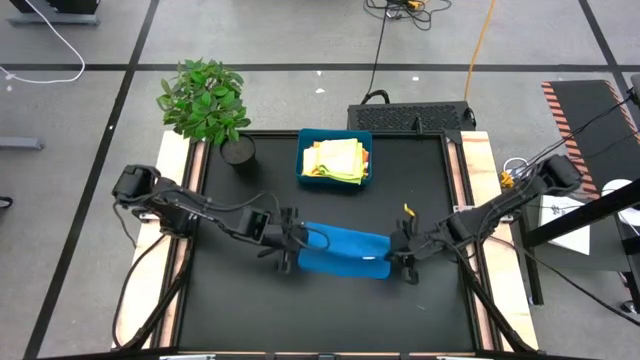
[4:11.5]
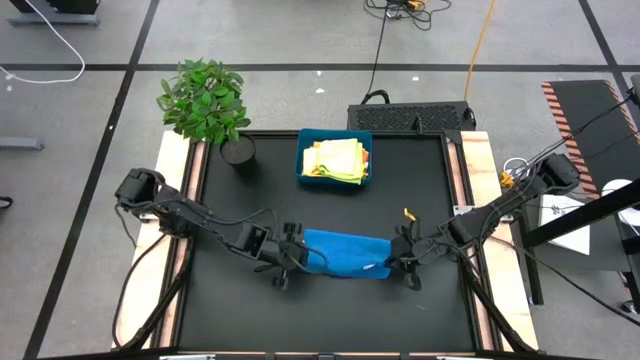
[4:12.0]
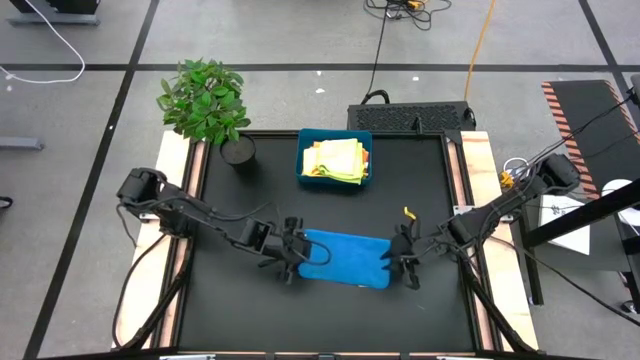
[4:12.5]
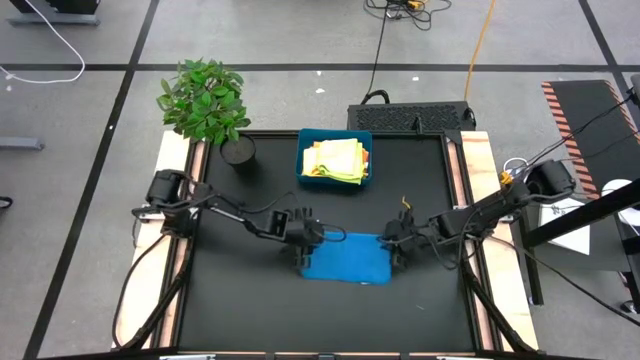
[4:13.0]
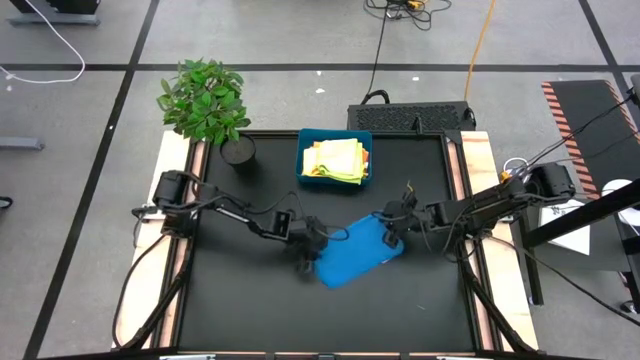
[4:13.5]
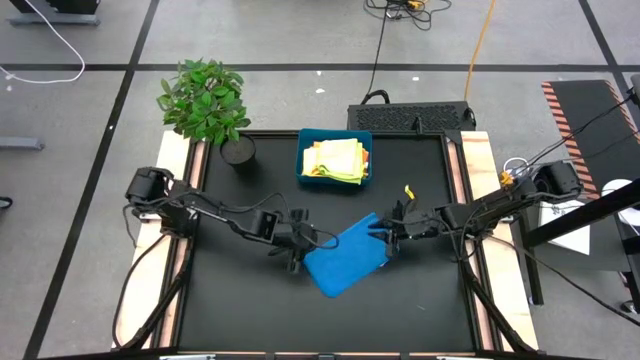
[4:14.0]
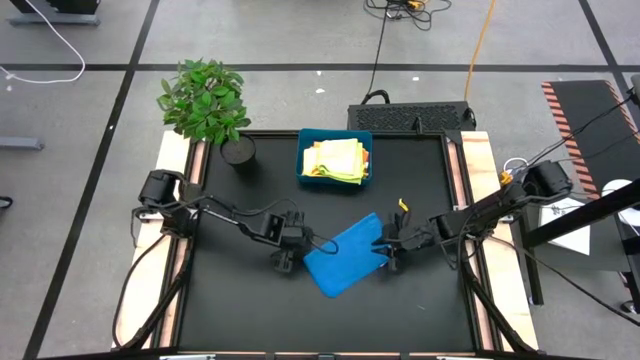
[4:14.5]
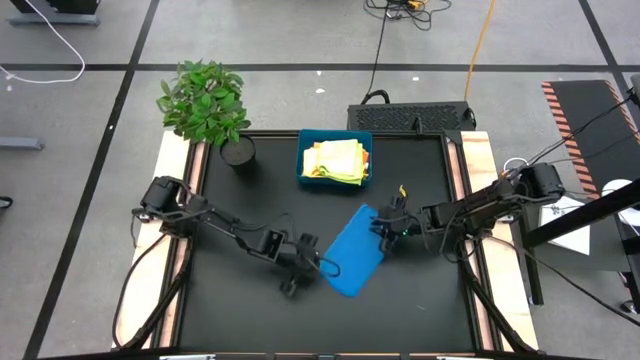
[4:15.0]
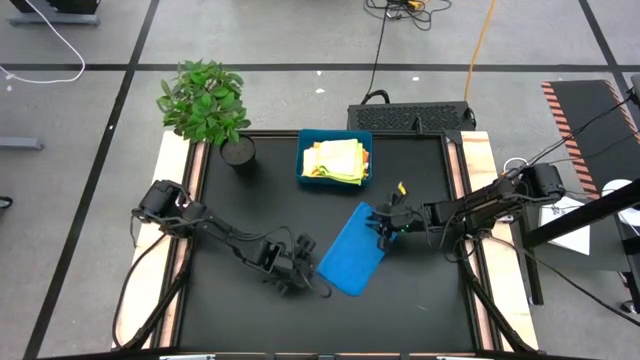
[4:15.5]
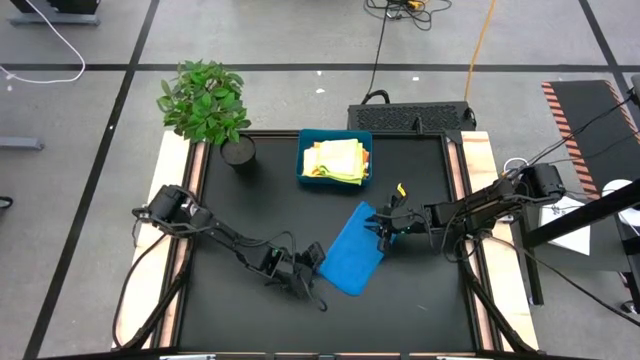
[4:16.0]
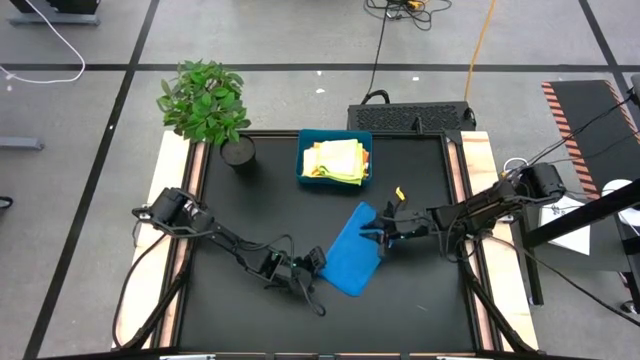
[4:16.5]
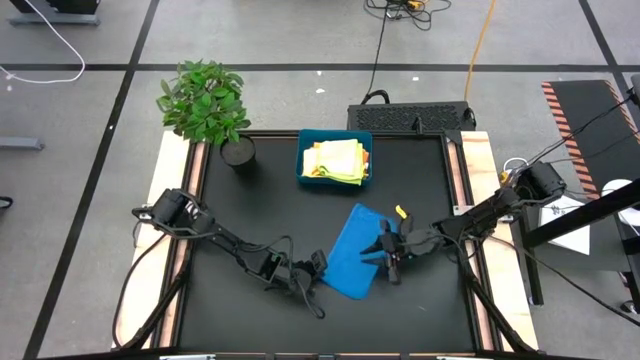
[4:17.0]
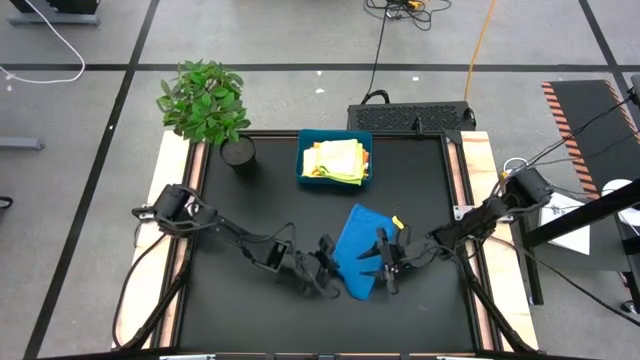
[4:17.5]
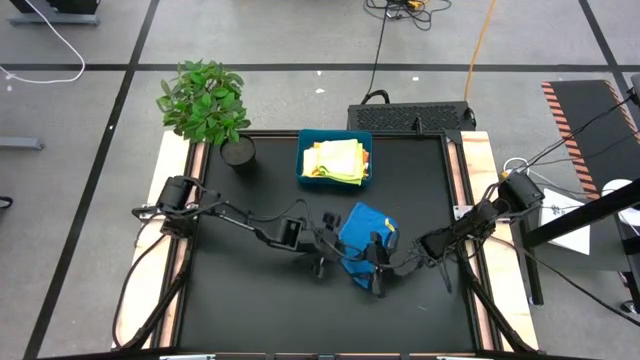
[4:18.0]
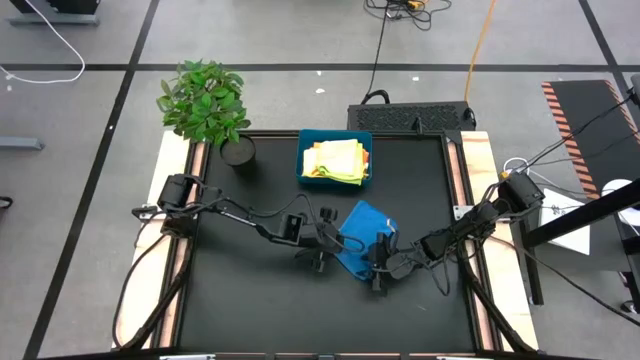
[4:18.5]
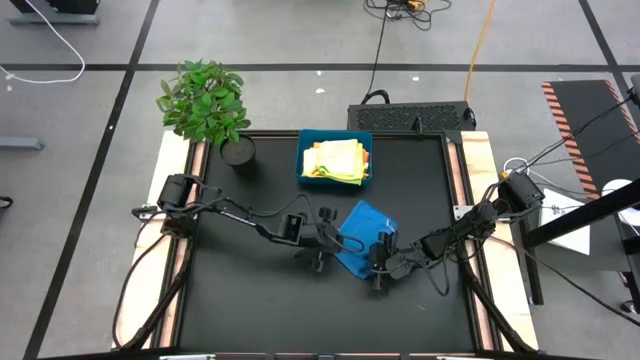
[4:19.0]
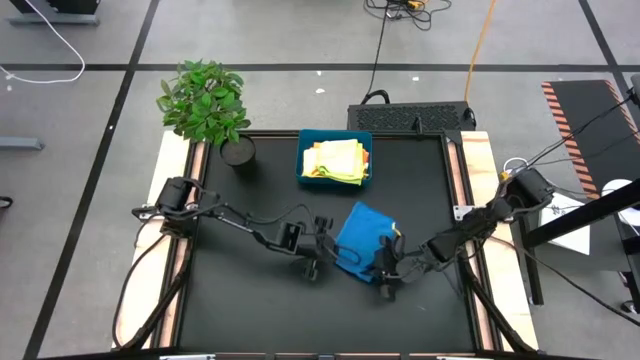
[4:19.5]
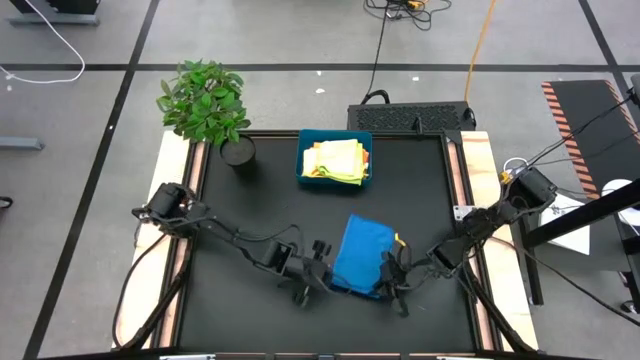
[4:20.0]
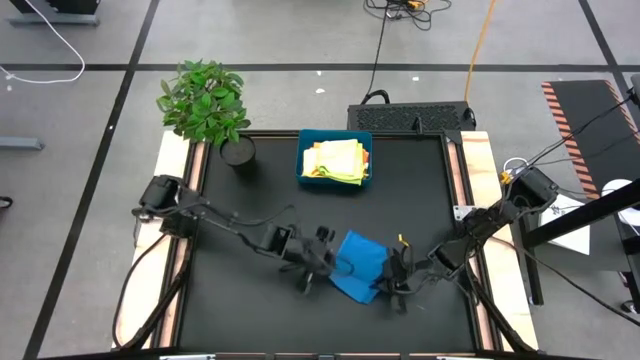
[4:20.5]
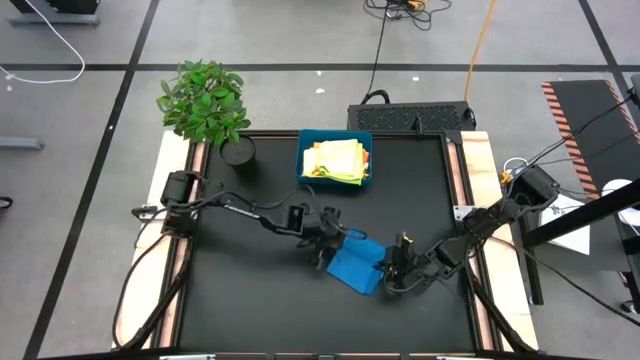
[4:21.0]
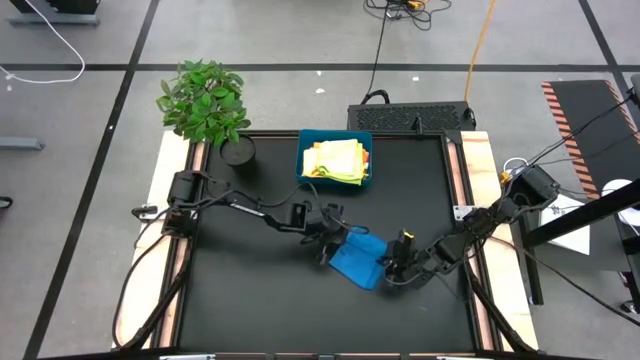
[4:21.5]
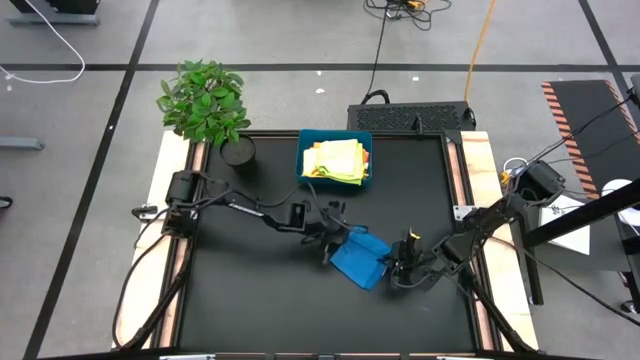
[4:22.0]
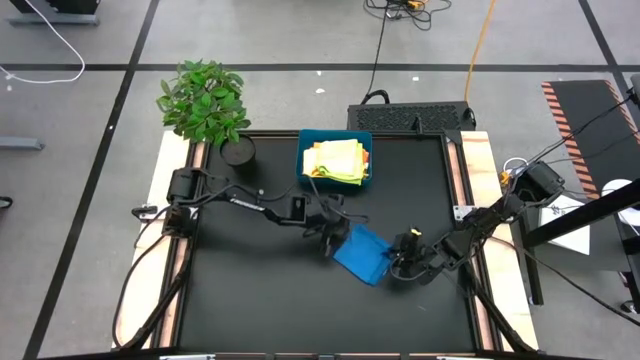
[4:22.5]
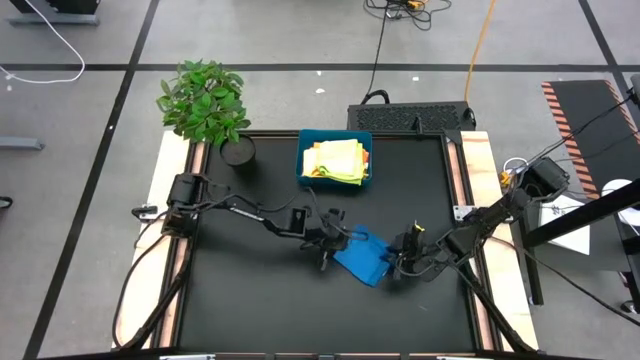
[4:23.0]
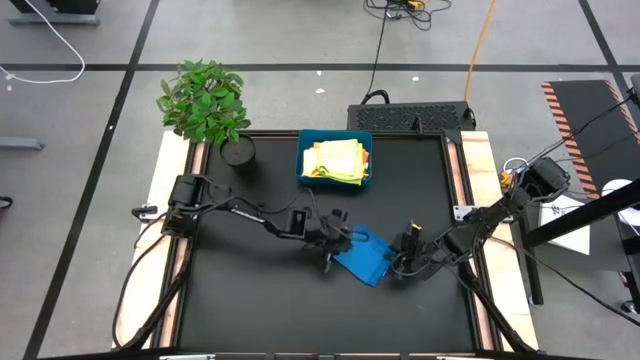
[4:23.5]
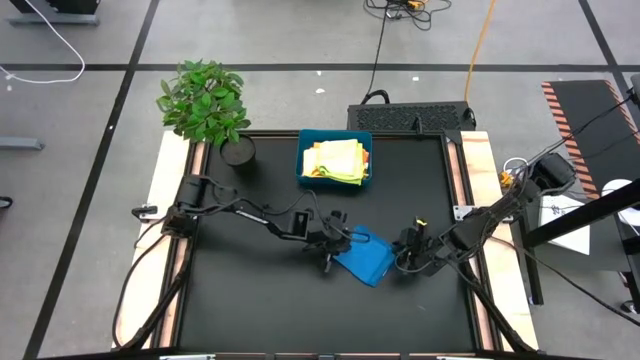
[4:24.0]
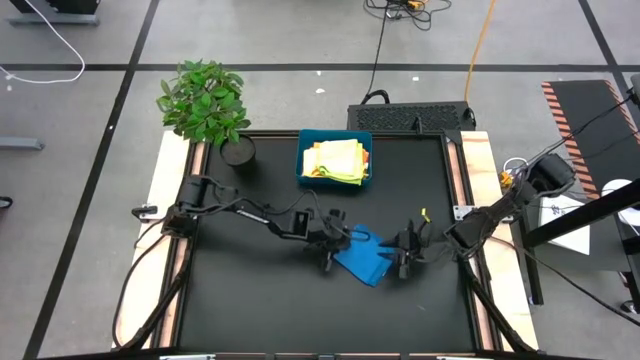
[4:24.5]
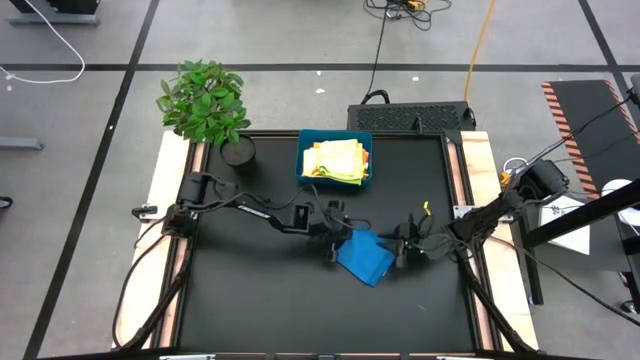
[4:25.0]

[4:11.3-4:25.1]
Task: Fold microfiber towels
Fold the blue microfiber towel

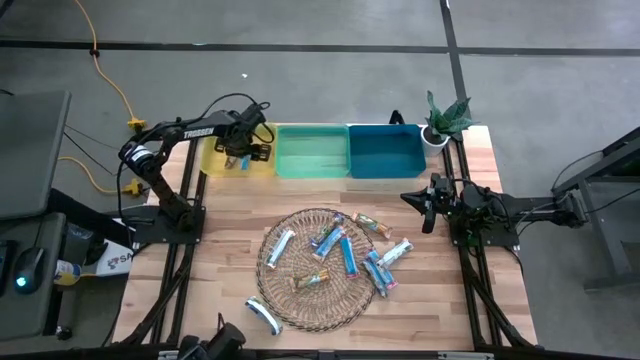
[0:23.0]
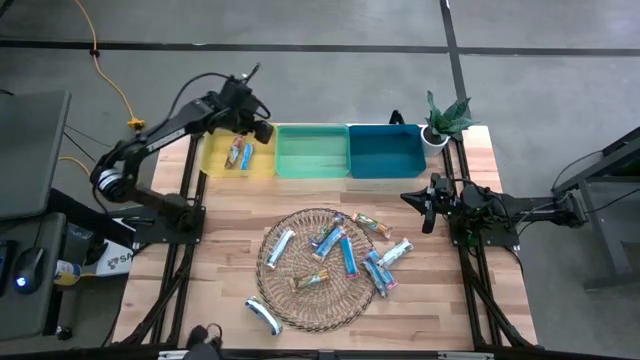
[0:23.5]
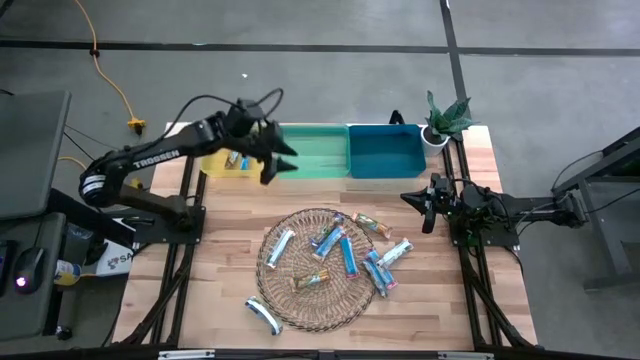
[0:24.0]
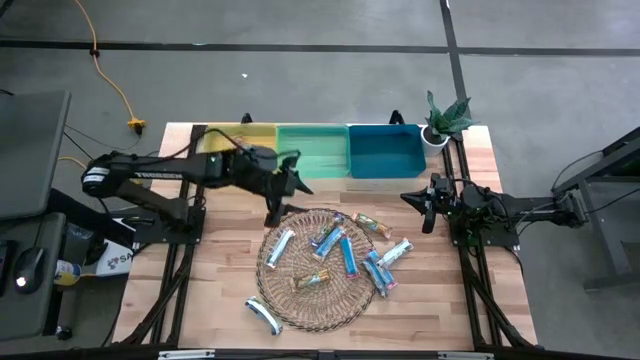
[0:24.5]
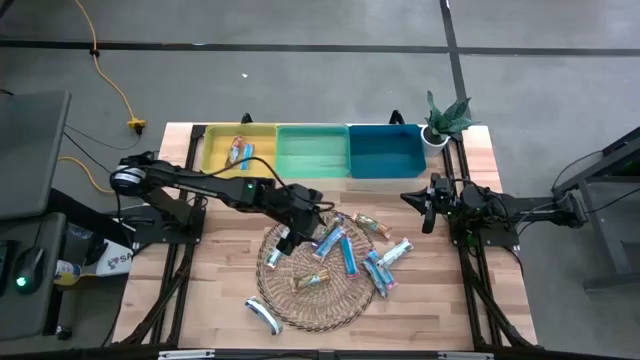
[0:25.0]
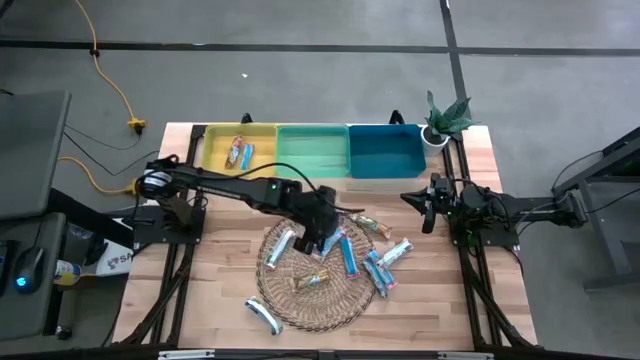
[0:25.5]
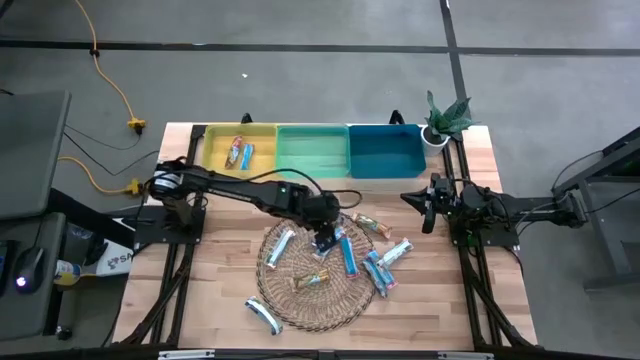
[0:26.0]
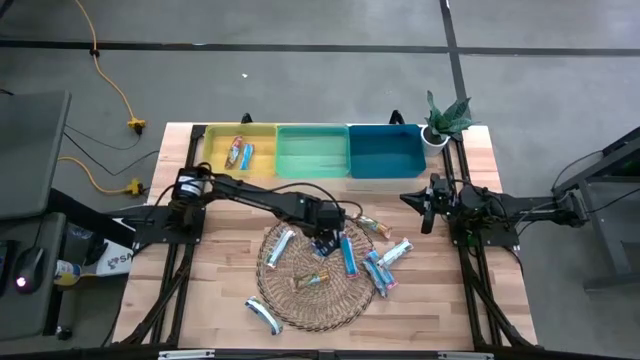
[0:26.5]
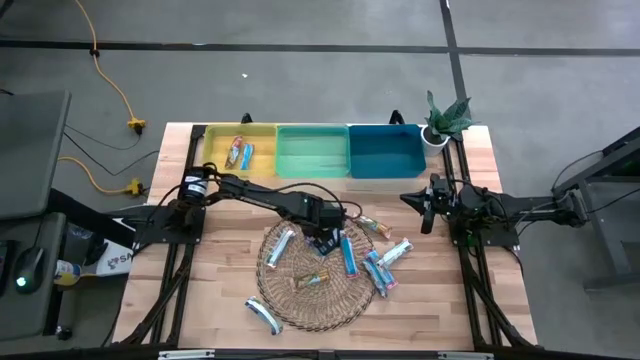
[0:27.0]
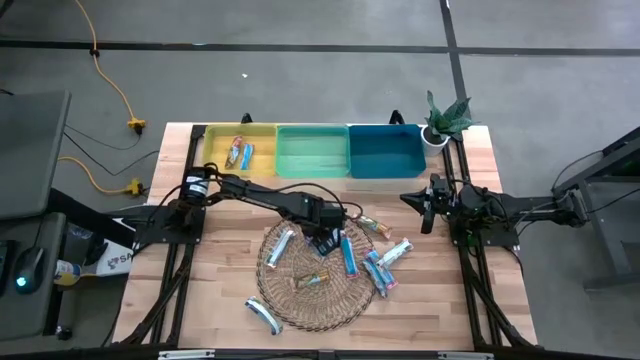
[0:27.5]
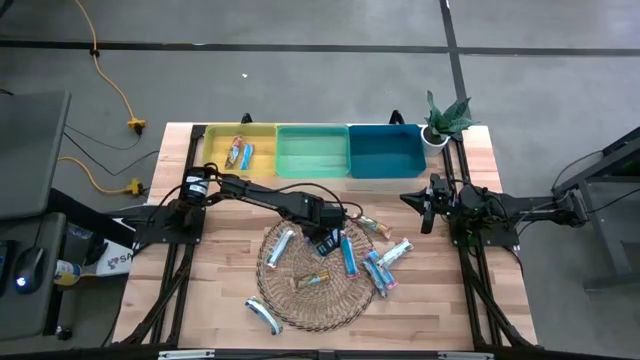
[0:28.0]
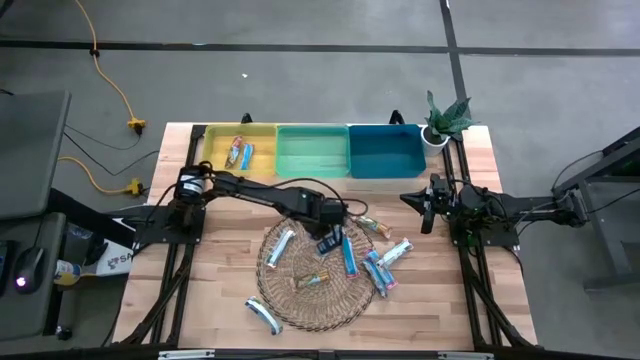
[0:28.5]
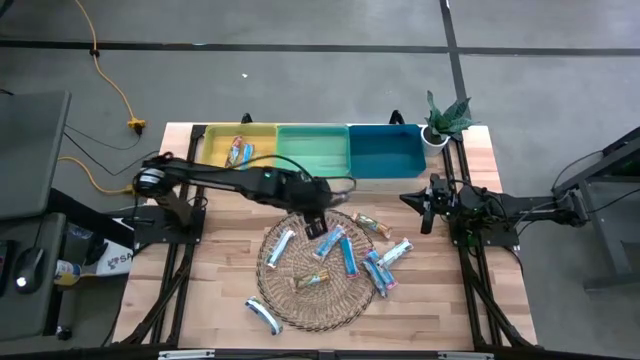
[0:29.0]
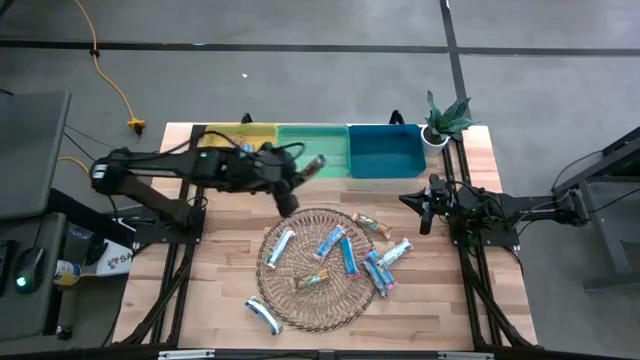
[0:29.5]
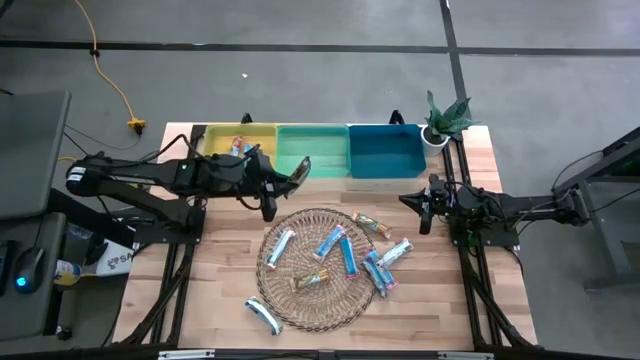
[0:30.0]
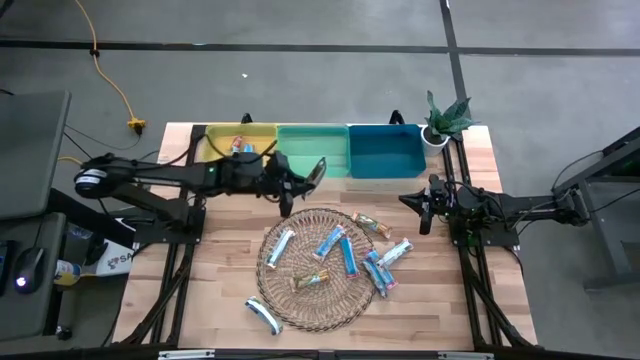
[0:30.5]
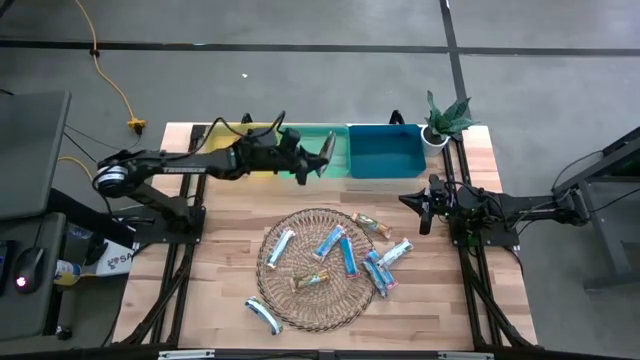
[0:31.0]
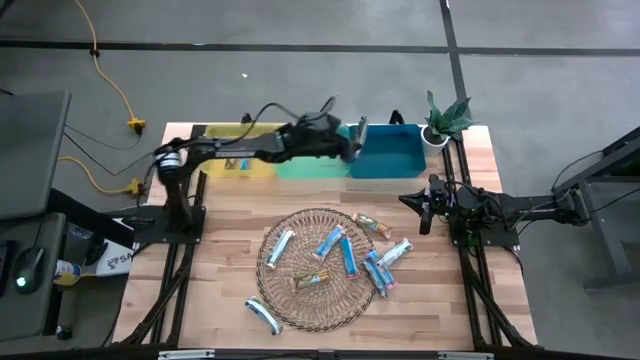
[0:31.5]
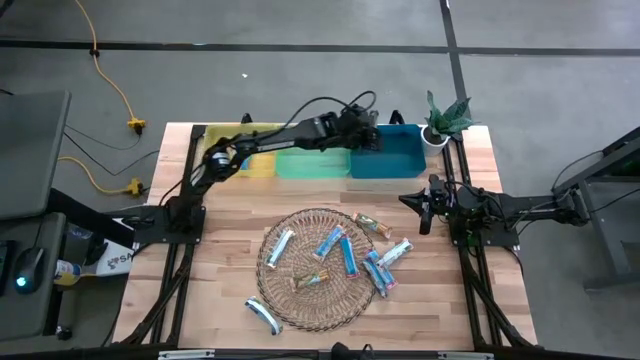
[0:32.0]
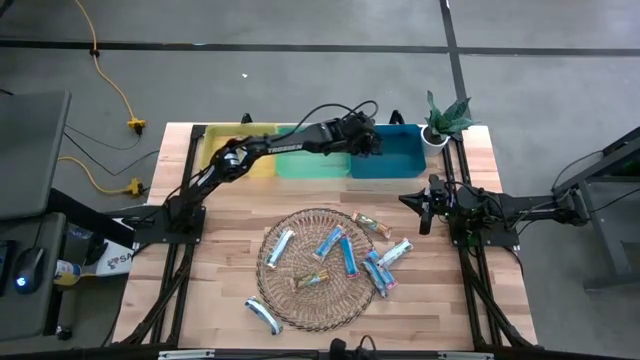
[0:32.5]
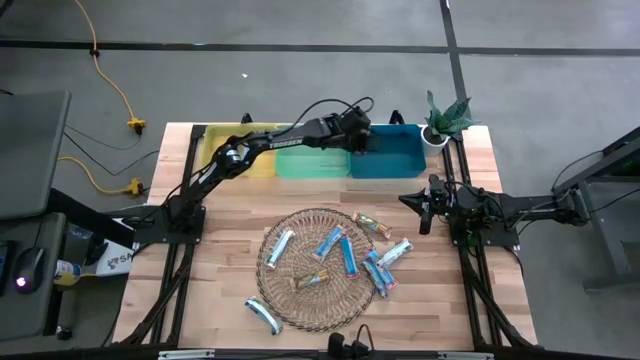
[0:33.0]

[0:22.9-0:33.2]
Task: Pick and place Granola Bars by type
Put the top blue granola bar into the blue bin
